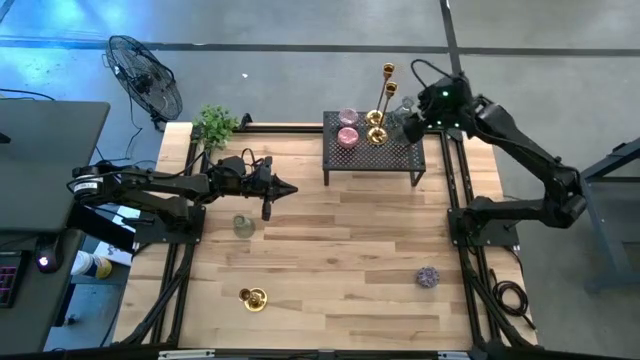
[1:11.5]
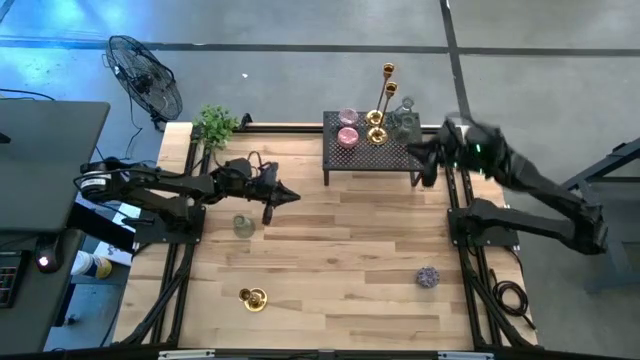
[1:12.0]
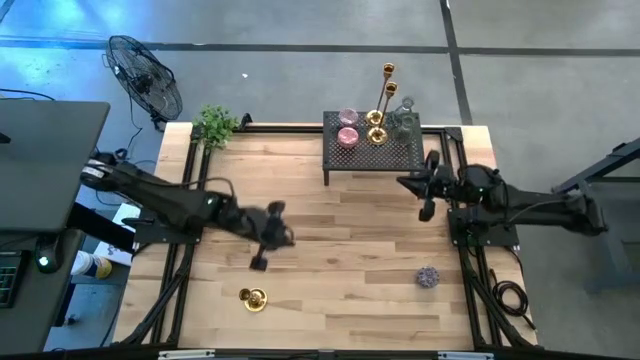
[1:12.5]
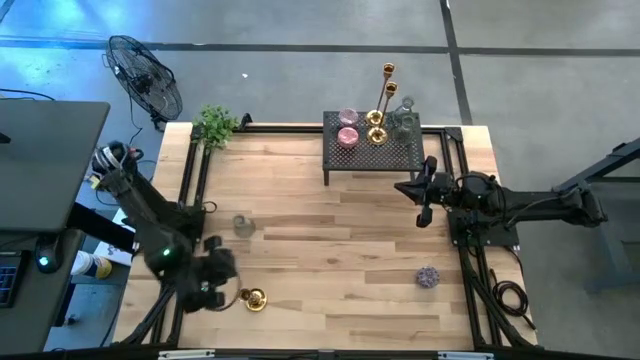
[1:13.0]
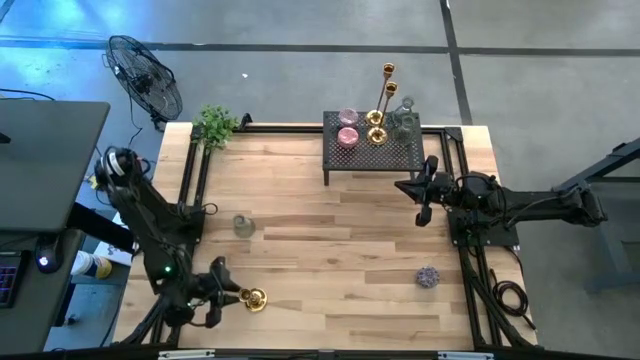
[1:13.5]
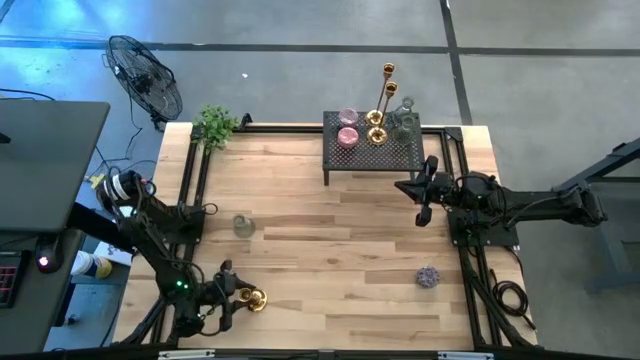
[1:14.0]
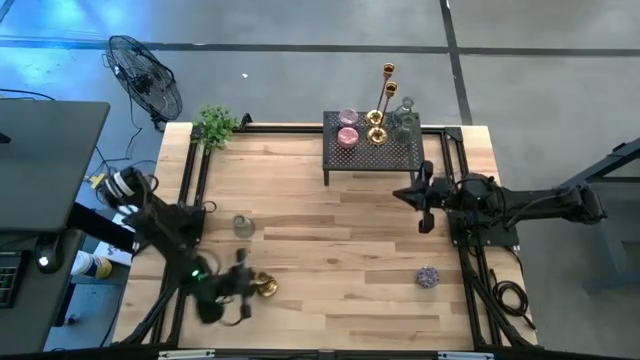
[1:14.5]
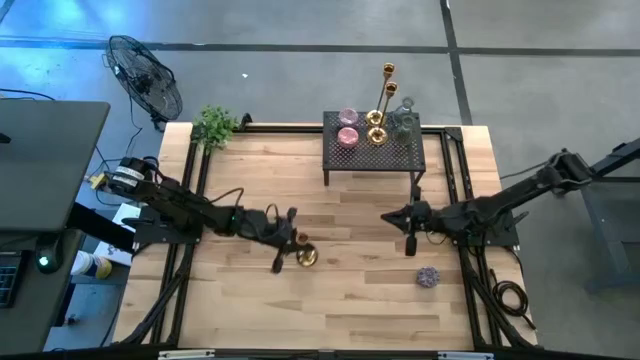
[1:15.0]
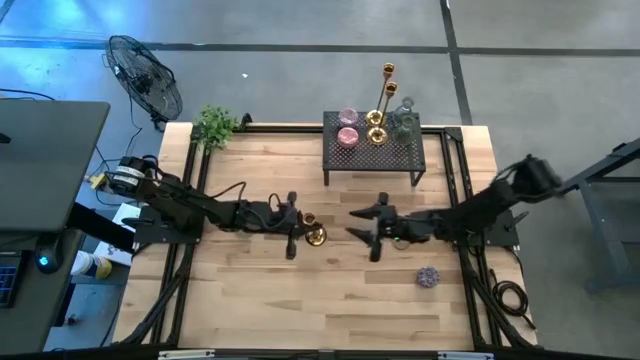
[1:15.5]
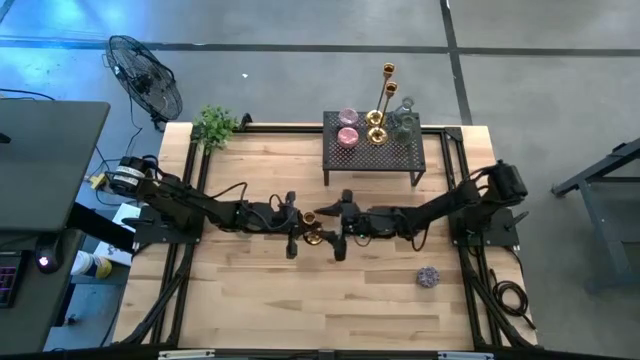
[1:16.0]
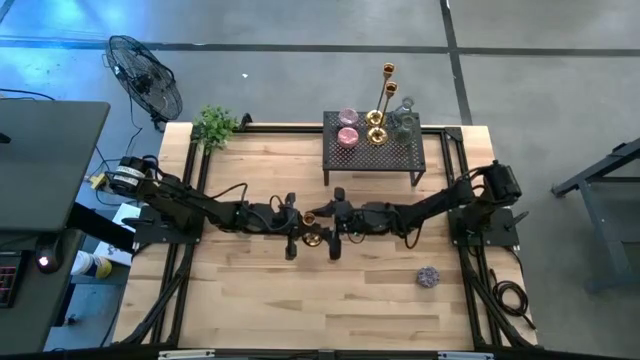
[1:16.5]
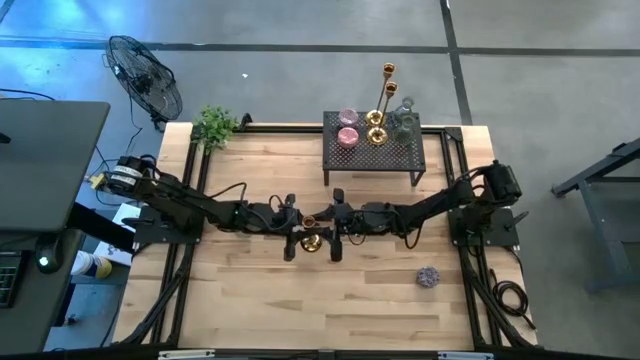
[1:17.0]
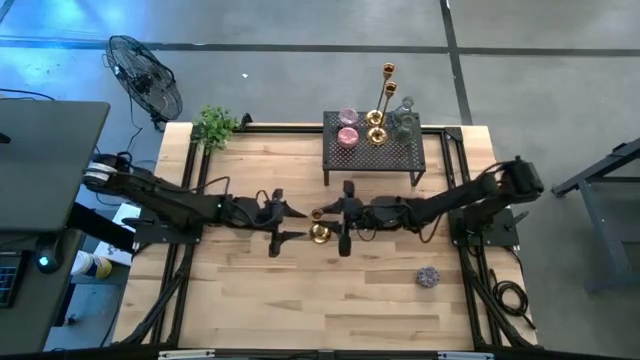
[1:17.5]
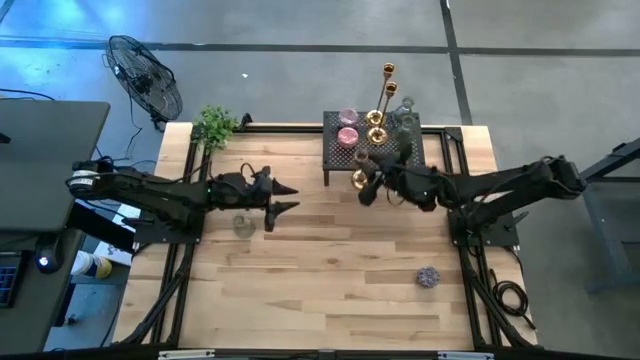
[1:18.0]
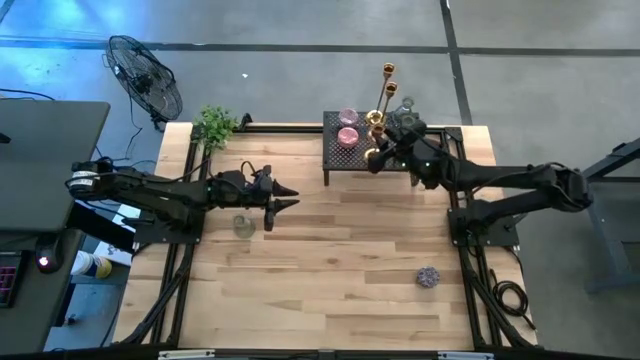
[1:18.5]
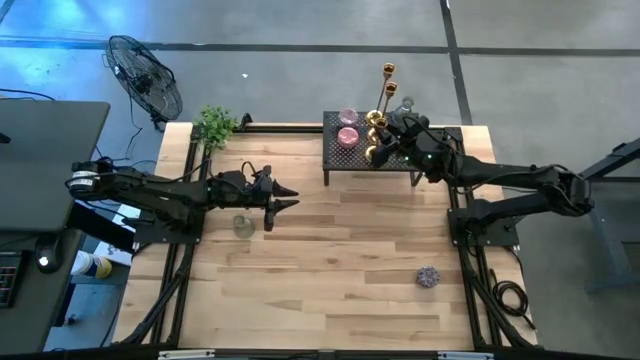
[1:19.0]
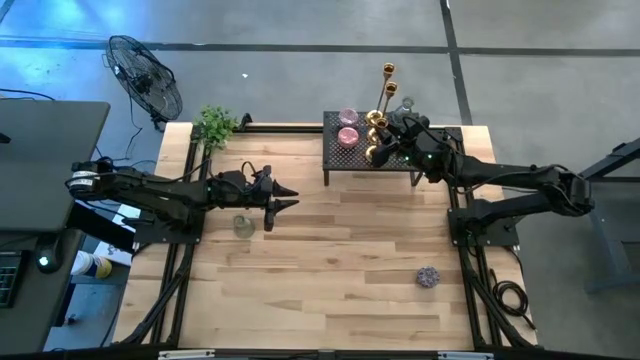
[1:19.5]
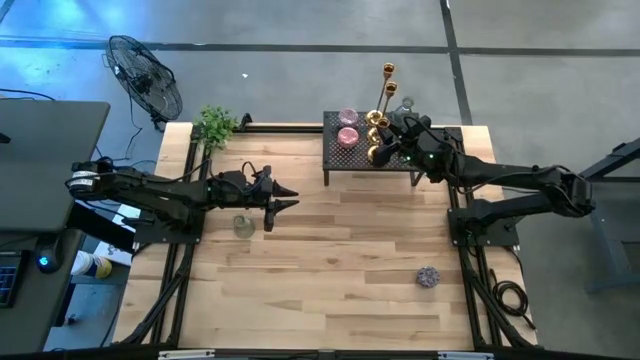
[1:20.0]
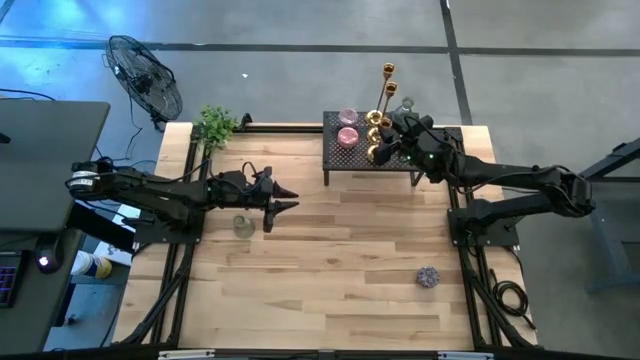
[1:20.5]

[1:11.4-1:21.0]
Task: Pick & Place candle stick holders
Put the gold candle holder on the shelf aligned with the other gold candle holder

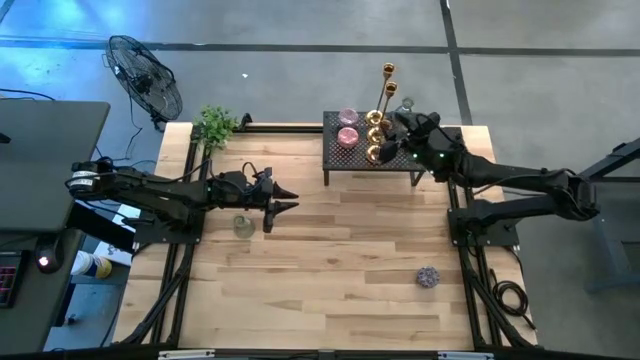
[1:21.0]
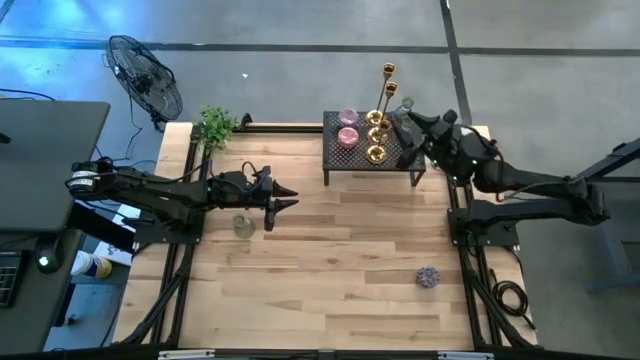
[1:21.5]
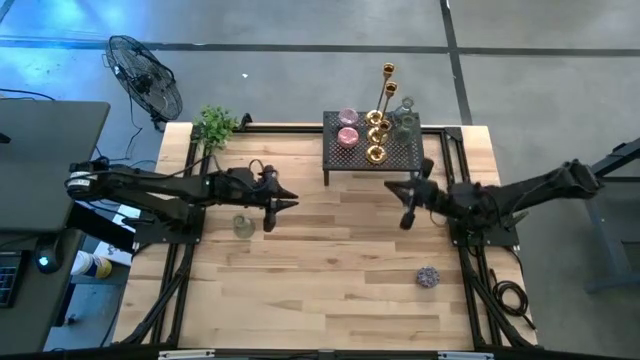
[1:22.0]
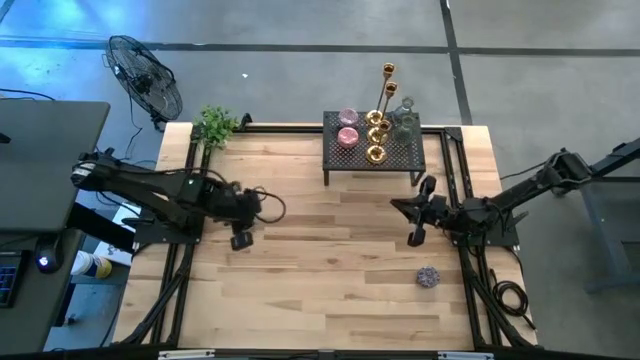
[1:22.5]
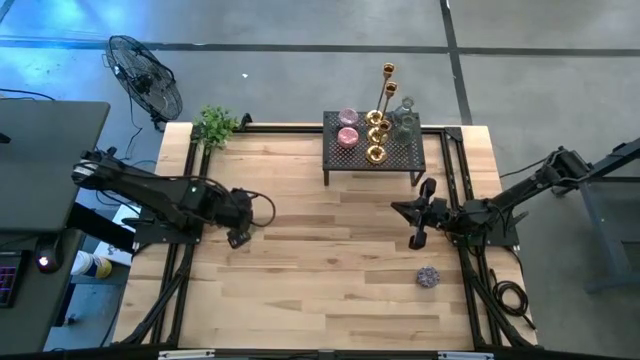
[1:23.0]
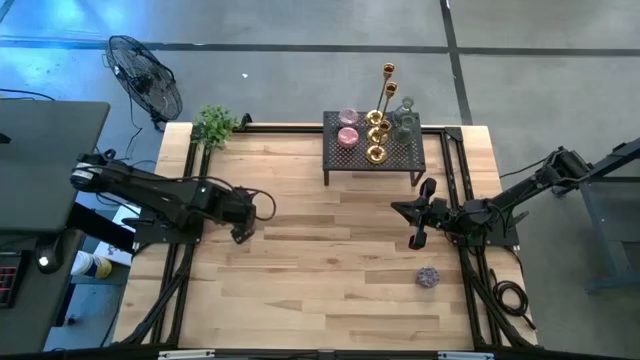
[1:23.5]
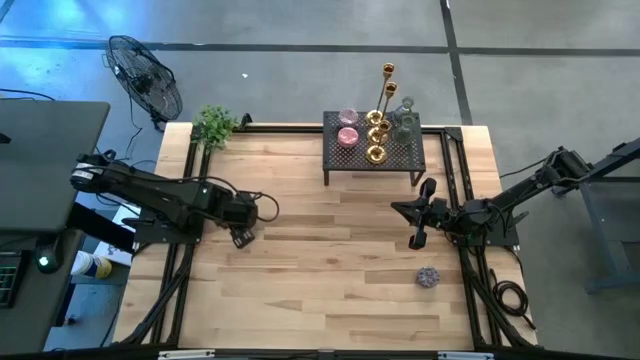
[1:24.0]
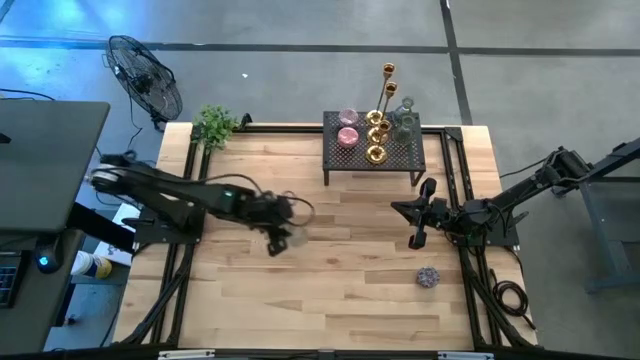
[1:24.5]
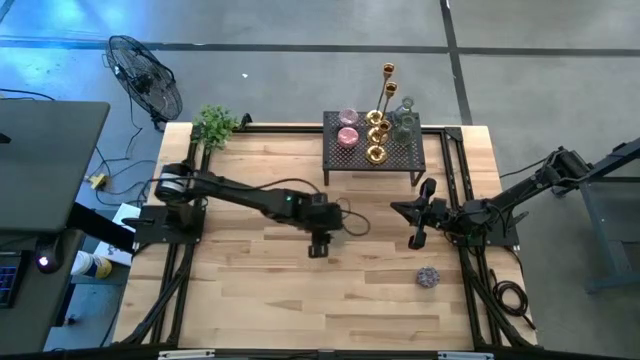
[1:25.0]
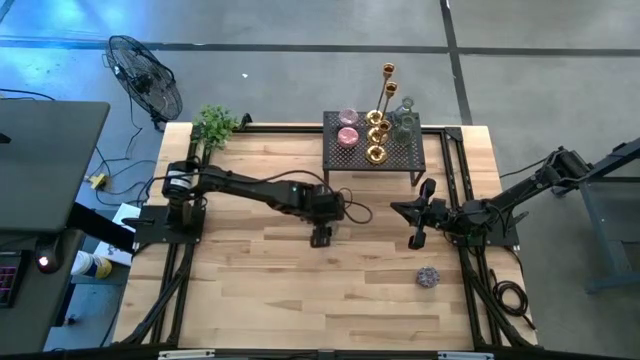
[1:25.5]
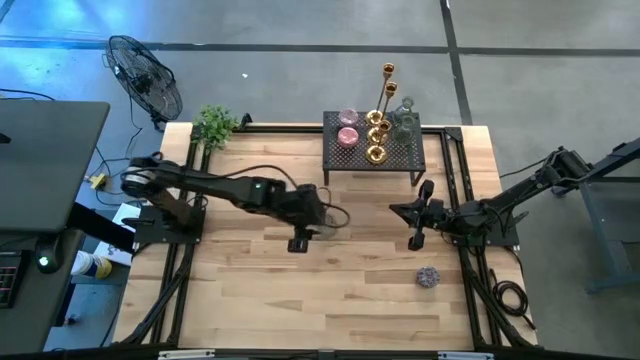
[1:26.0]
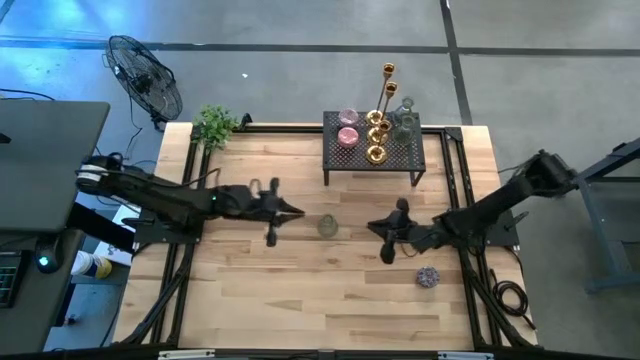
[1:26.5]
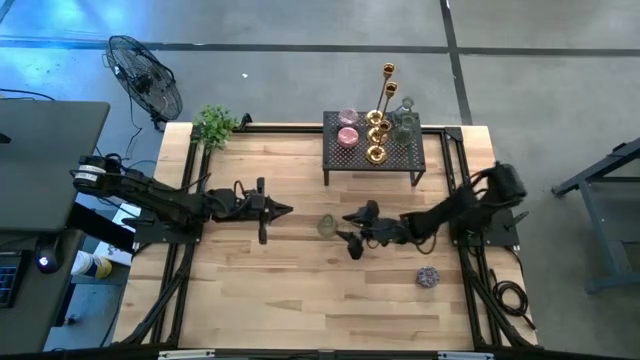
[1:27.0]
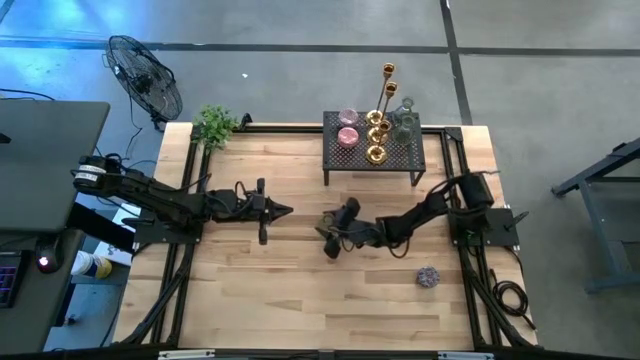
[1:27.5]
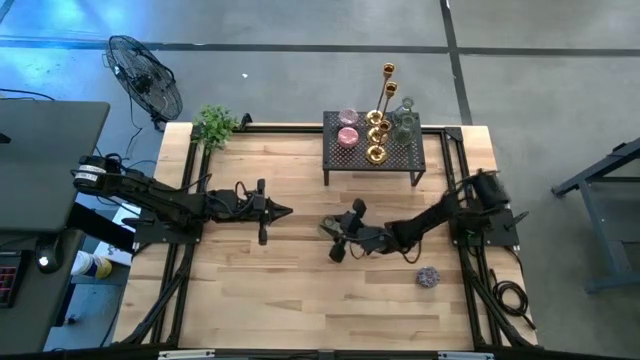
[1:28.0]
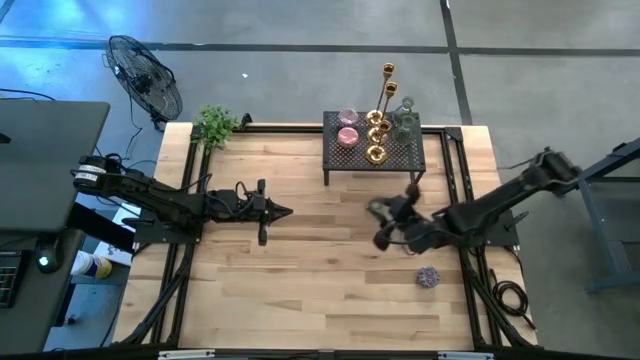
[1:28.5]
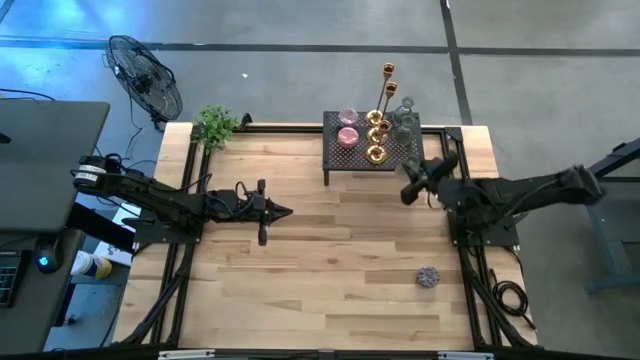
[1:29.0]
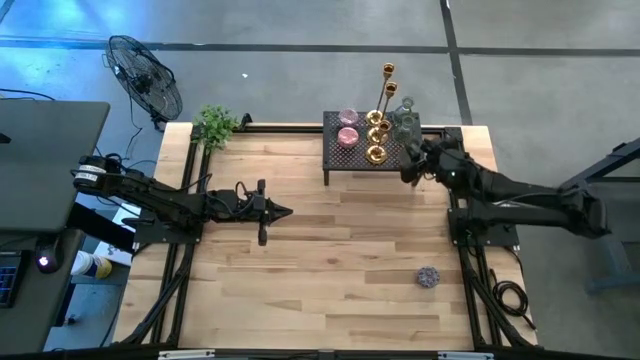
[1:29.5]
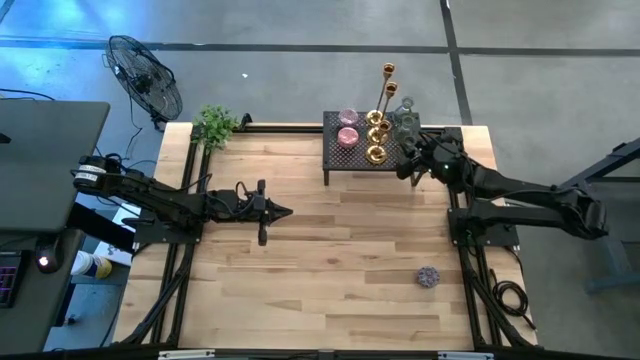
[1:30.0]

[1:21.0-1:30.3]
Put the transparent candle holder on the shelf aligned with the other transparent candle holder

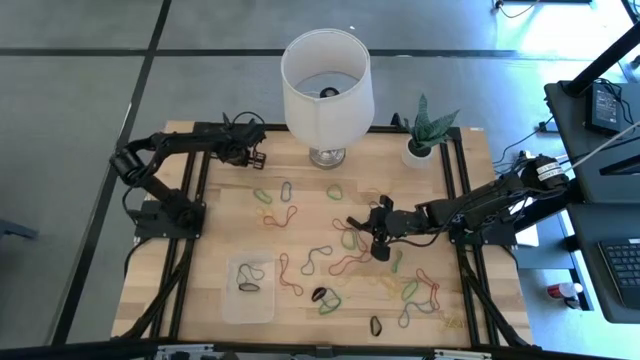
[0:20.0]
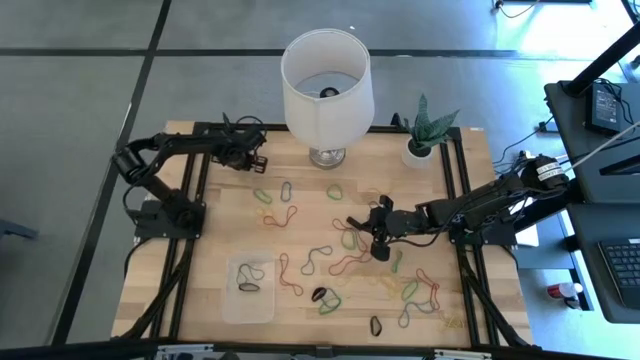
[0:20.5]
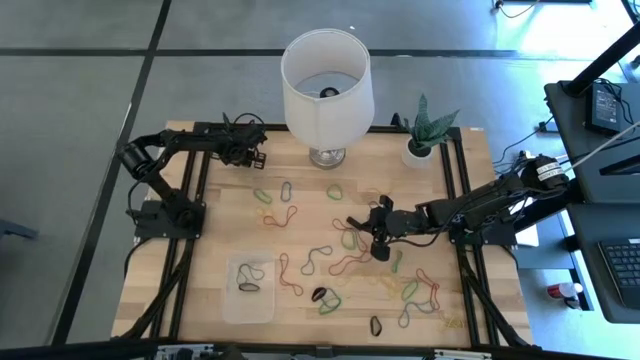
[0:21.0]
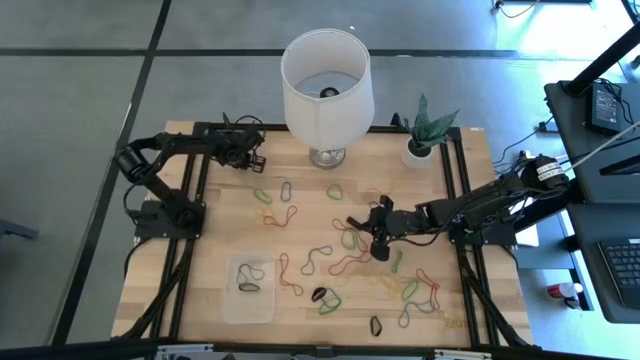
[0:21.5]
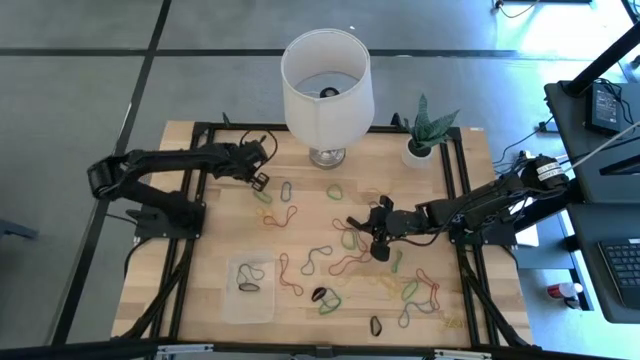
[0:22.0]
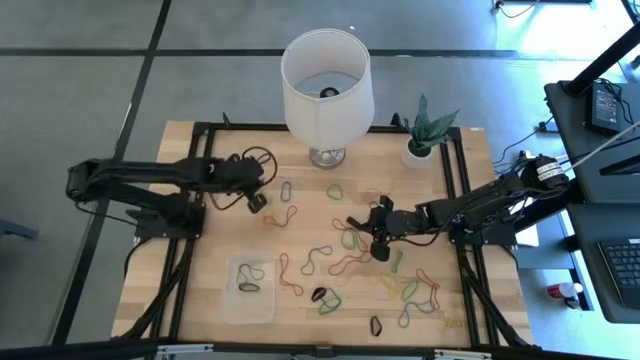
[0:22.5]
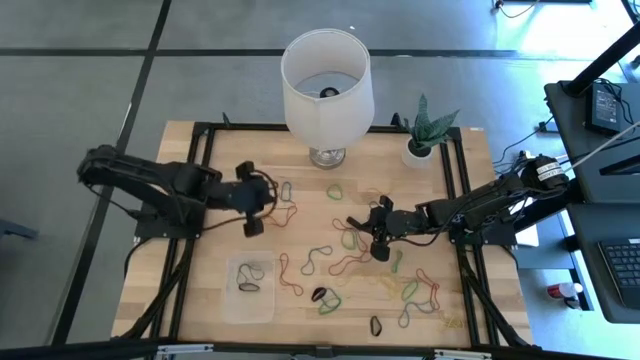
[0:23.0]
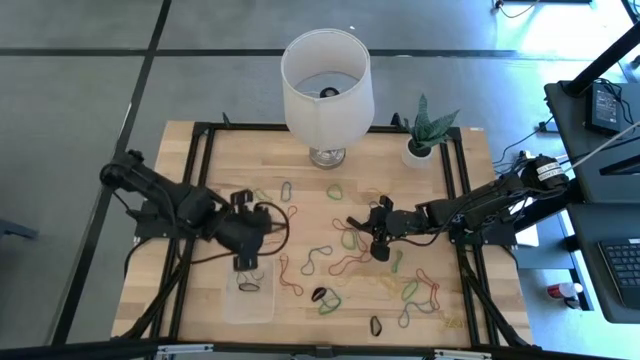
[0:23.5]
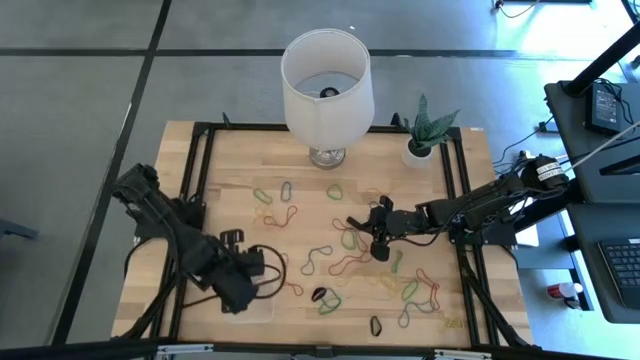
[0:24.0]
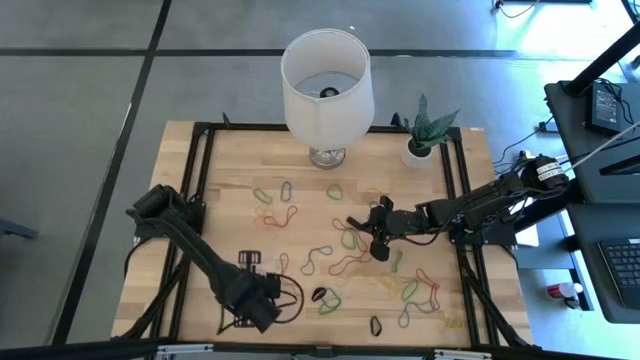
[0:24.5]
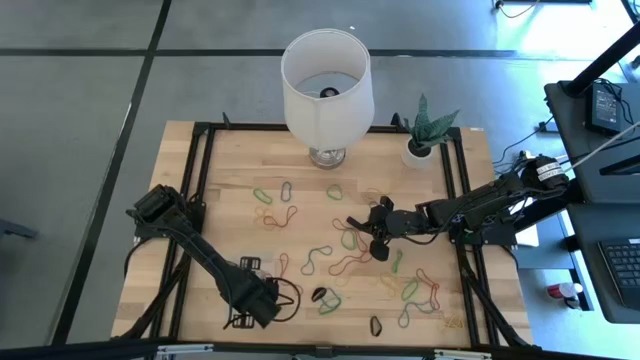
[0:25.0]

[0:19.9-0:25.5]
Task: Pick and place rubber bands into bin
Put the red rubber band into the transparent bin
